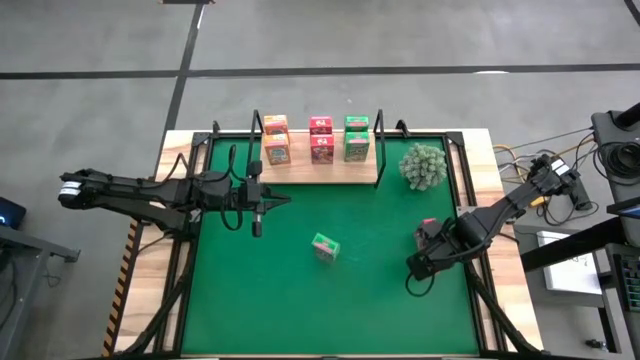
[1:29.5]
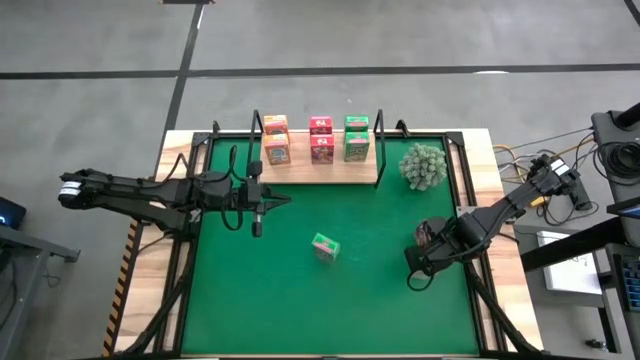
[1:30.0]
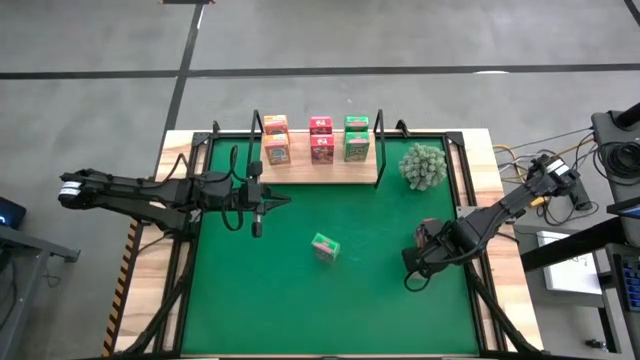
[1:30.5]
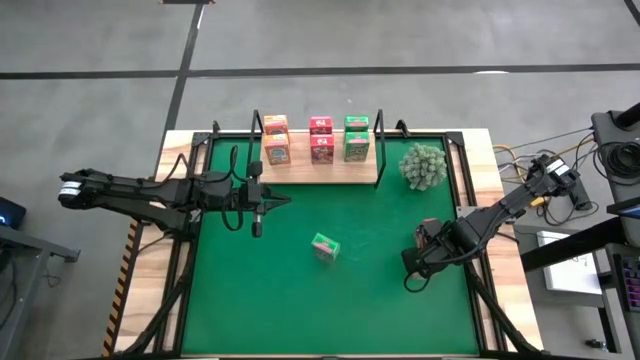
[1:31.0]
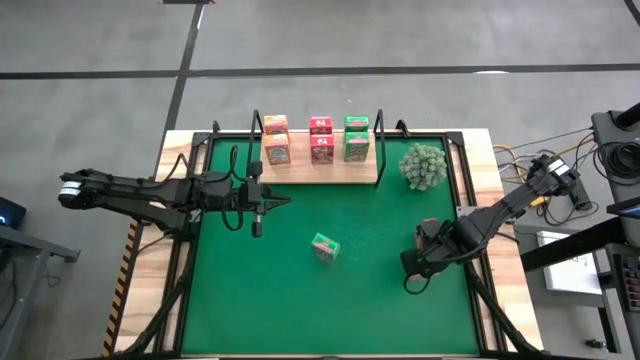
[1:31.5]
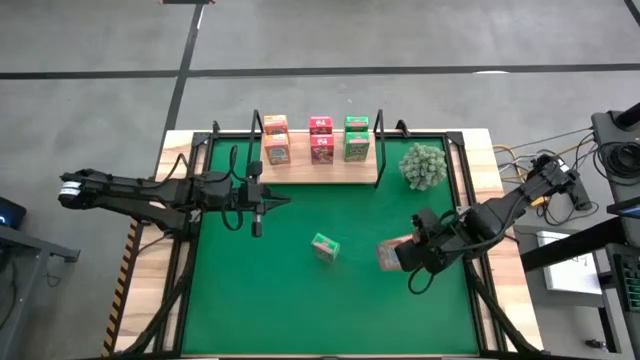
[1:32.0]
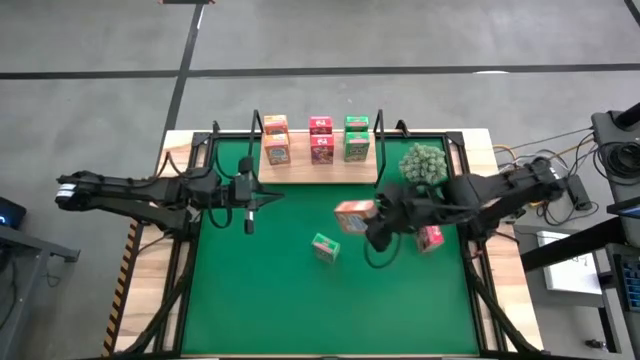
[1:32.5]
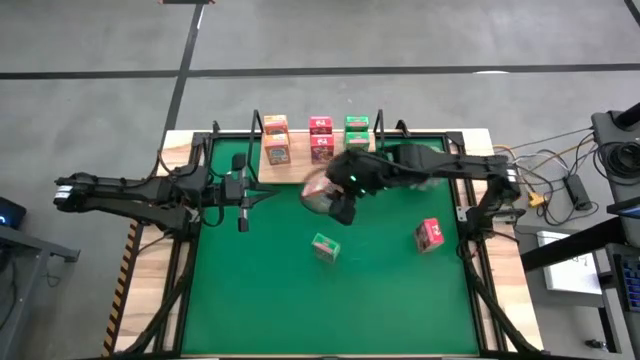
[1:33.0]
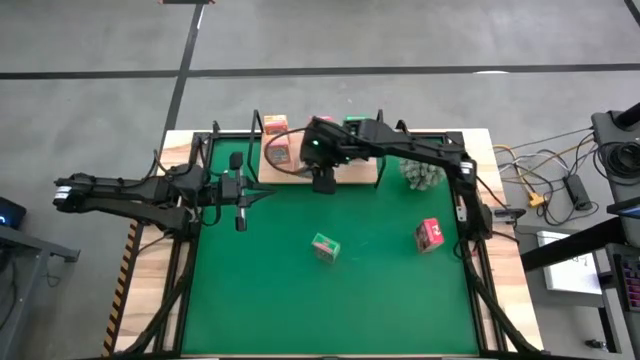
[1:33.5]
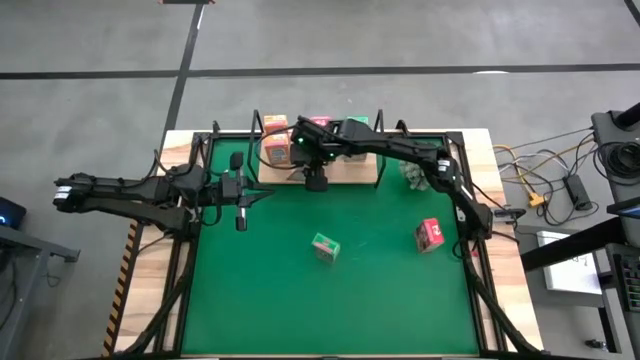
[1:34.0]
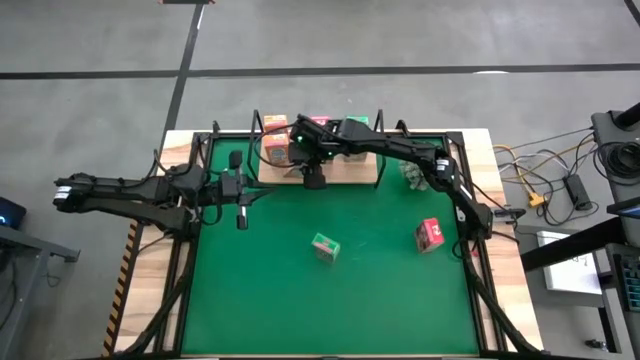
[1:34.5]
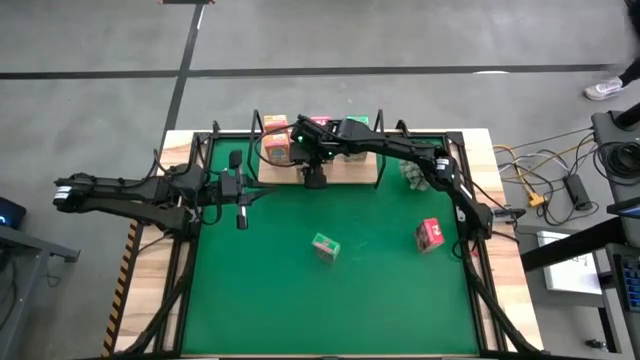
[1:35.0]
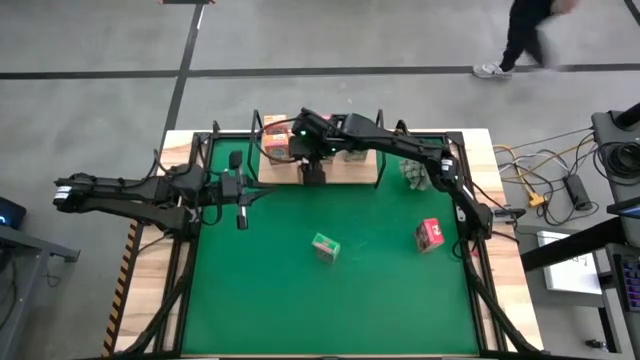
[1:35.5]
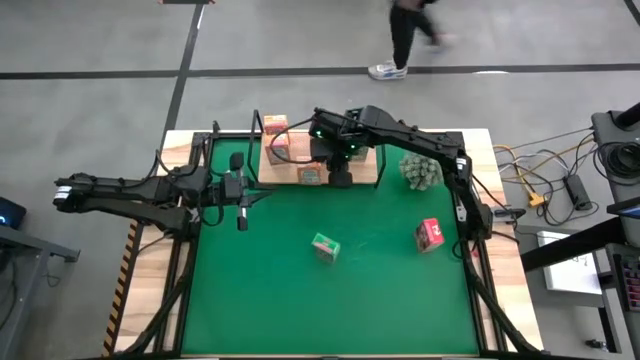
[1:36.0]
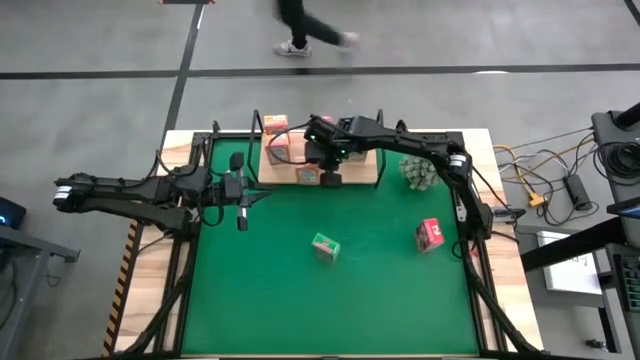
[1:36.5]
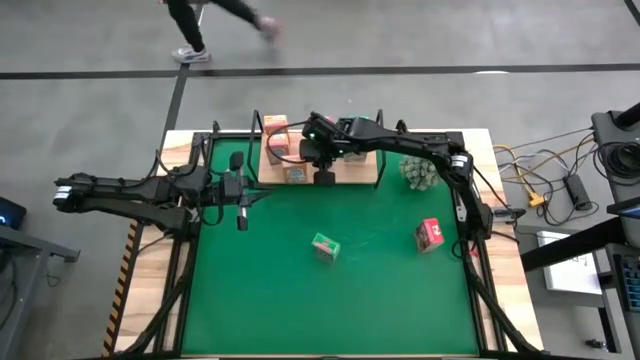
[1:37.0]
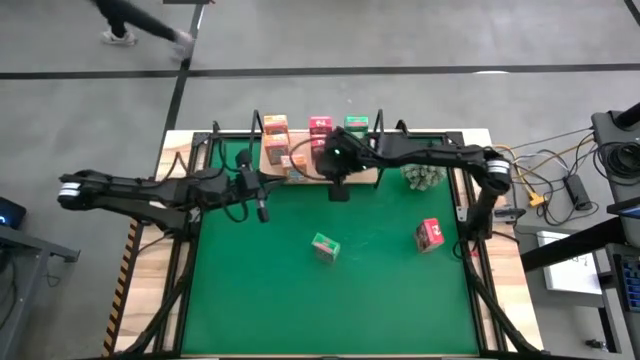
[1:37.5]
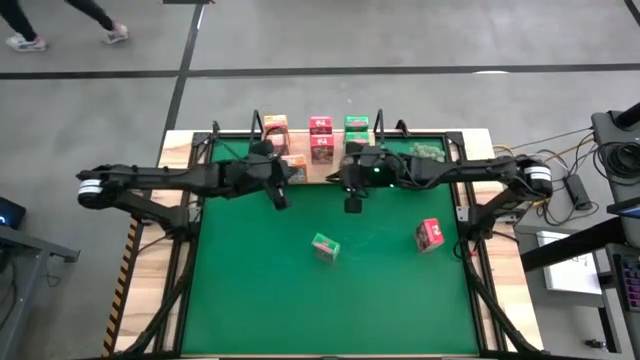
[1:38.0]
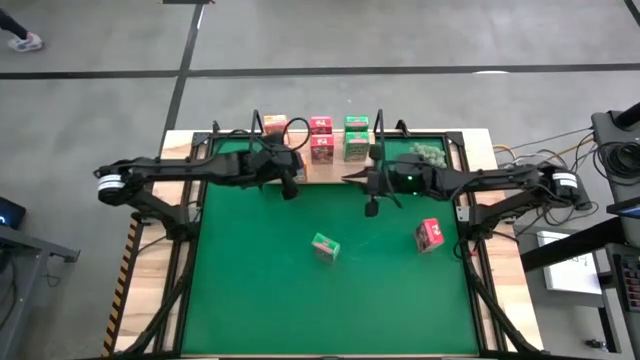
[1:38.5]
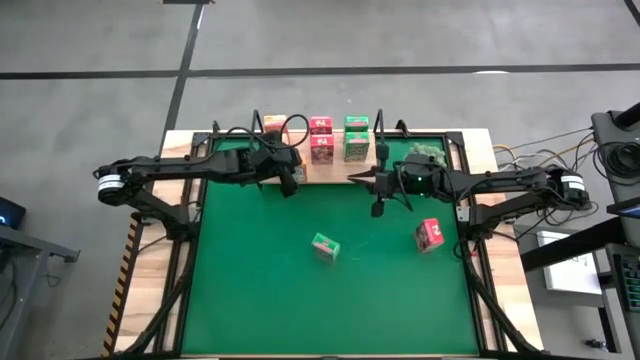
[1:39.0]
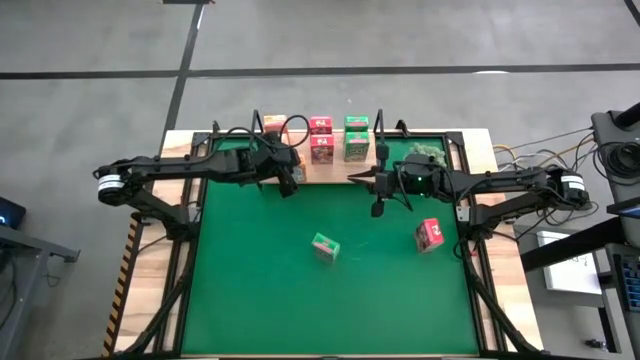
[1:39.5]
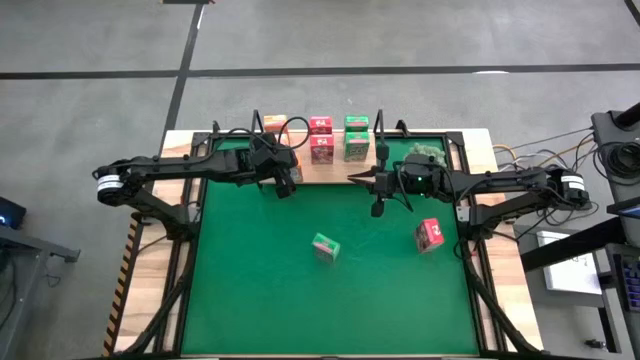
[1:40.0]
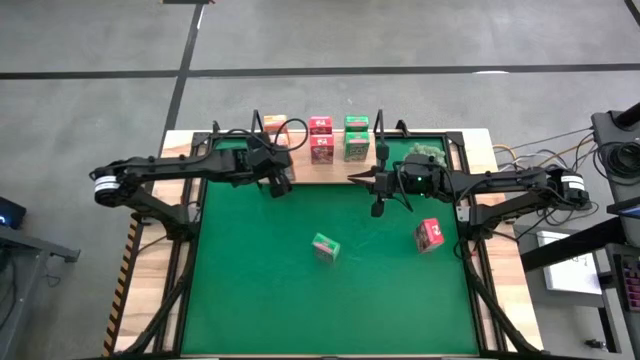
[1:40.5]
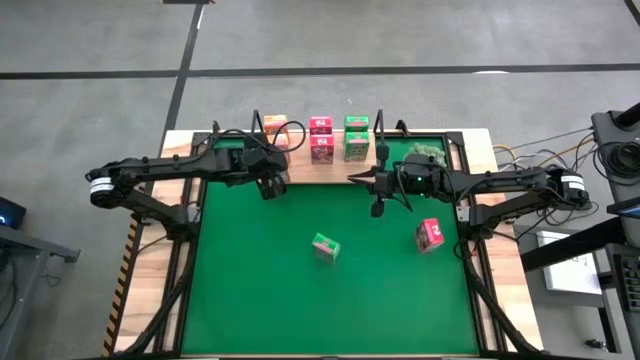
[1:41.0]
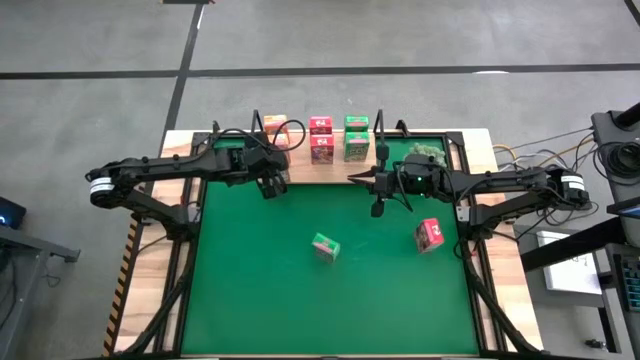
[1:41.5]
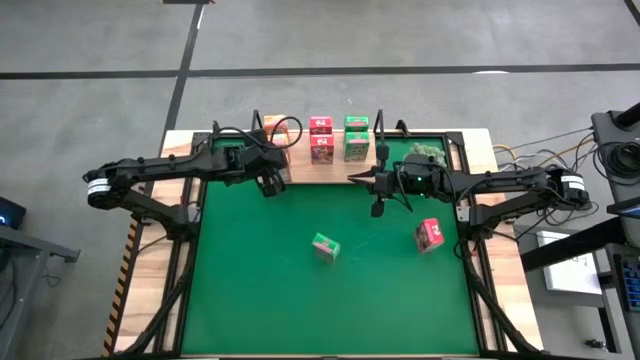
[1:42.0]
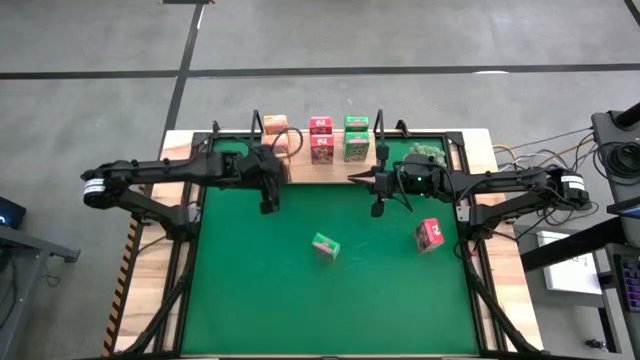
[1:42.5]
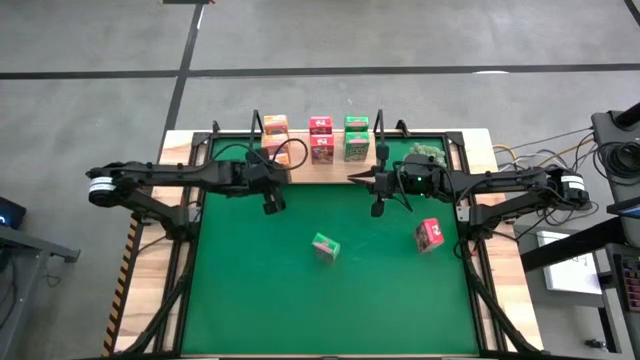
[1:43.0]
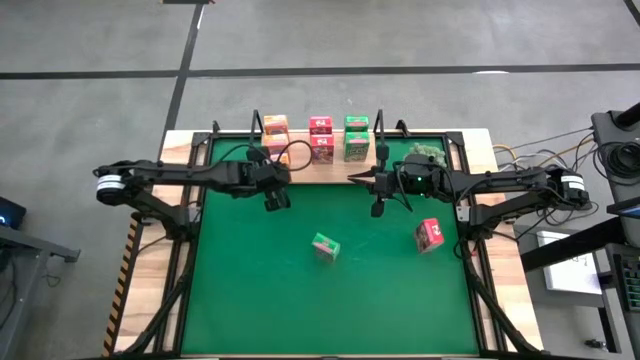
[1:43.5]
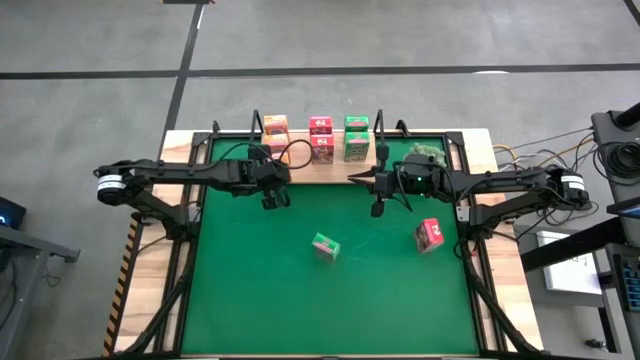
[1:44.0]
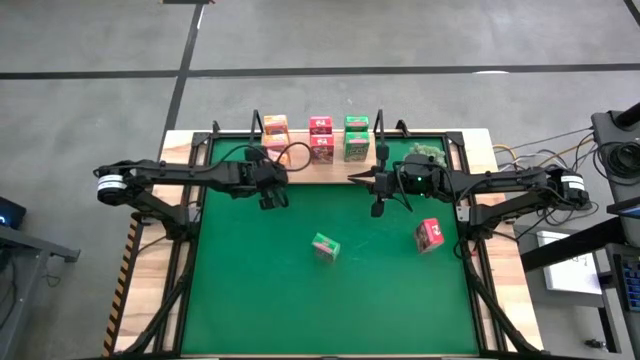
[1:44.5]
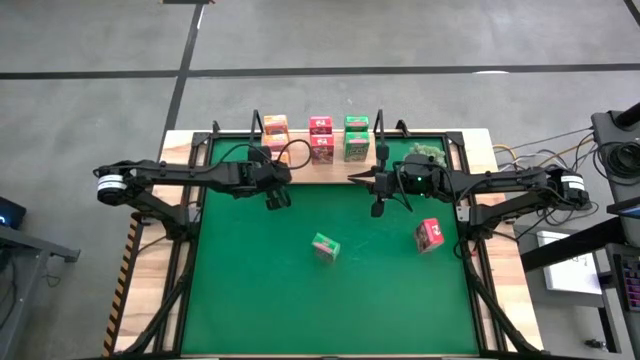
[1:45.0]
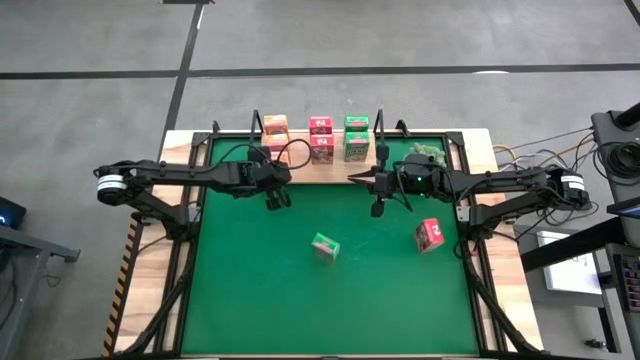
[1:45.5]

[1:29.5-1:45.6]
Task: Stack cereal on shelf
Put the orange cereal box on the shelf aligned with the other orange cereal boxes

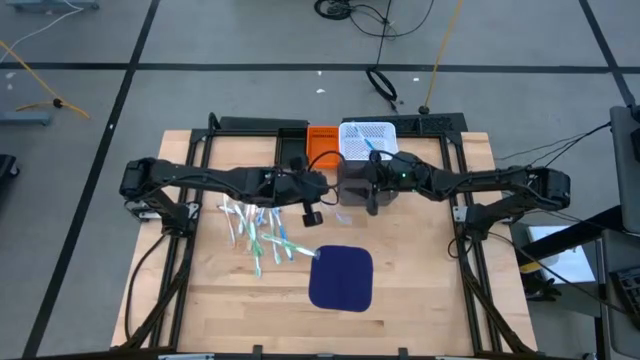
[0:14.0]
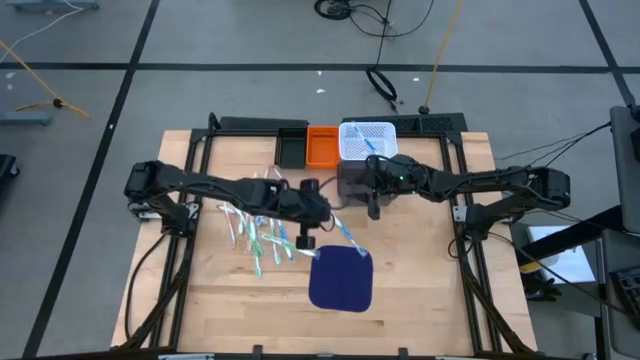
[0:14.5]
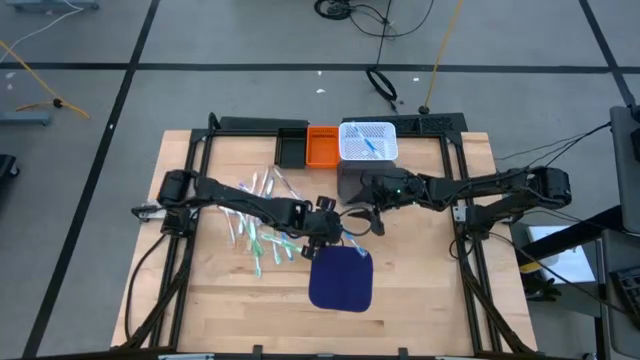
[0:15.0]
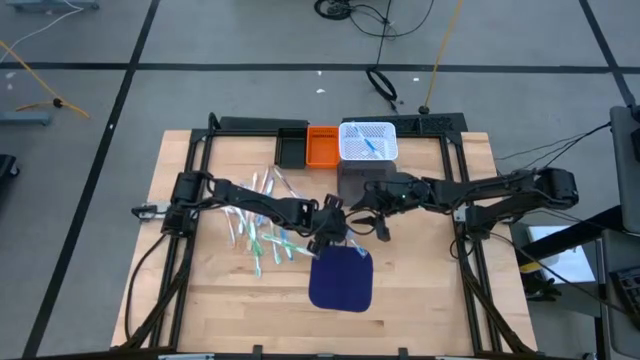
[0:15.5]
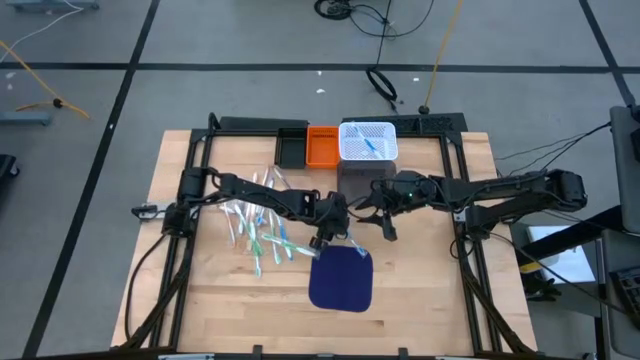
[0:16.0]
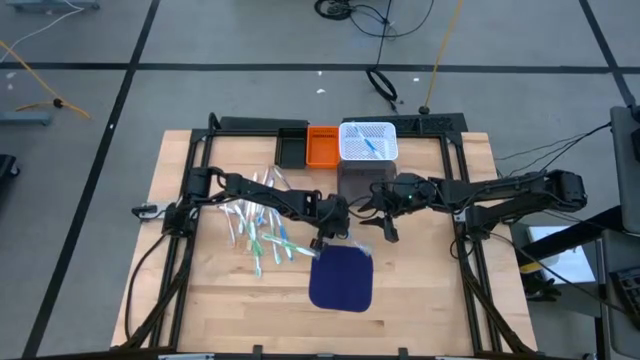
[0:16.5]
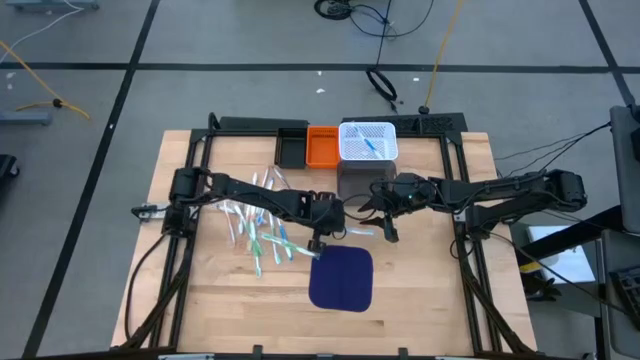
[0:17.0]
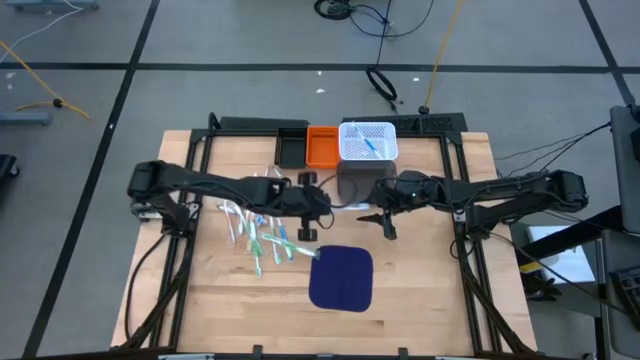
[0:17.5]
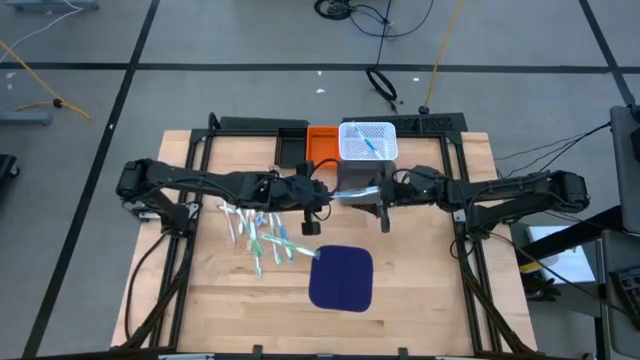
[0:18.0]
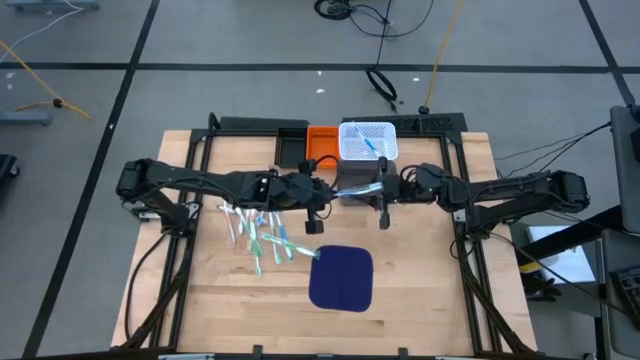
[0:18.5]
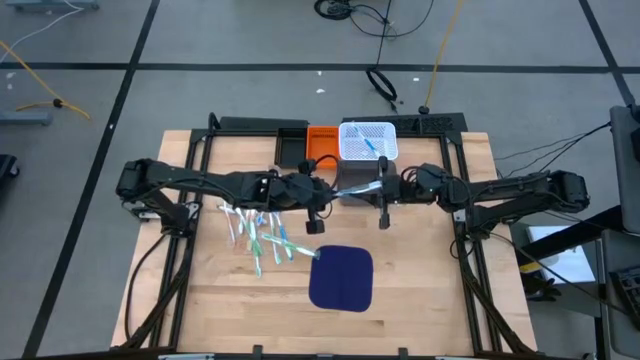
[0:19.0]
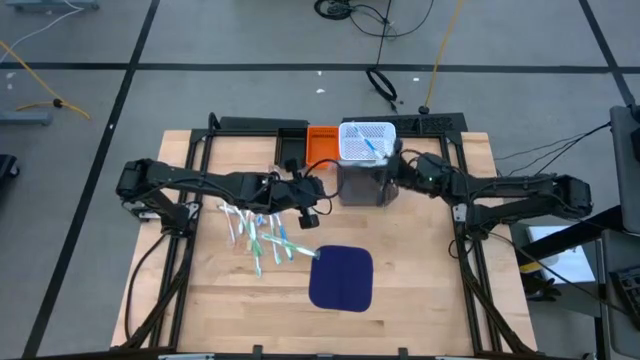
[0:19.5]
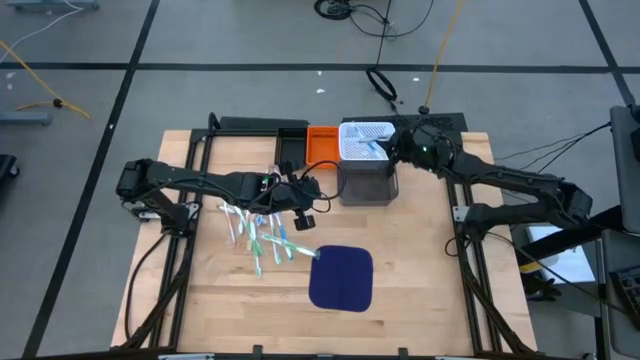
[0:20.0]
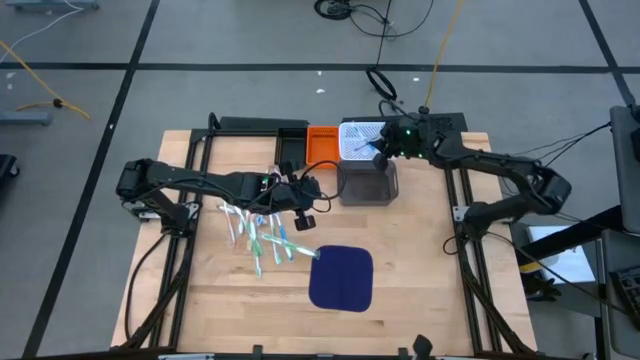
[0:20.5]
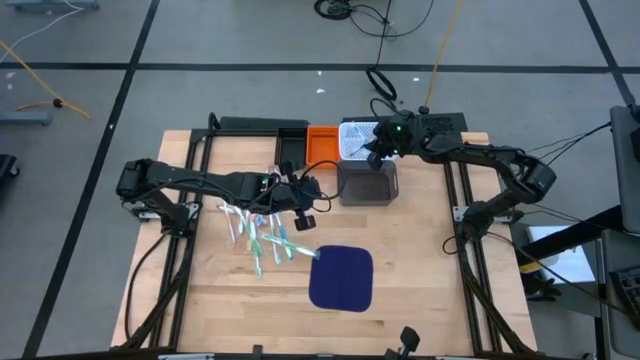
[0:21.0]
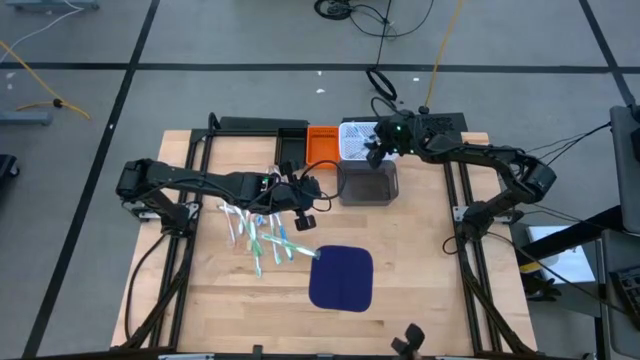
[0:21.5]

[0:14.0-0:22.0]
Task: Pick & Place Toothbrushes
Put the blue toothbrush into the white basket
